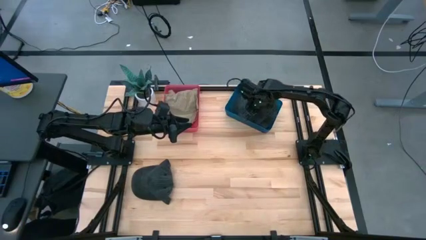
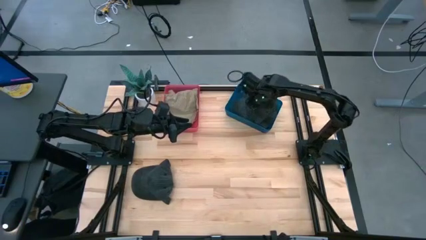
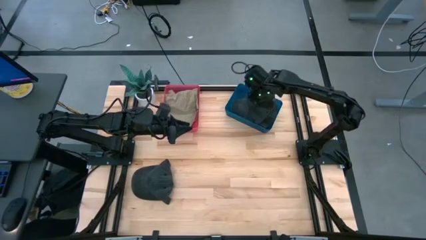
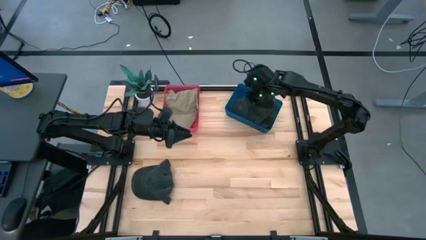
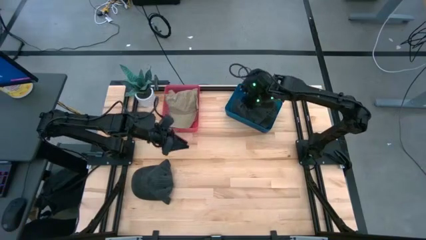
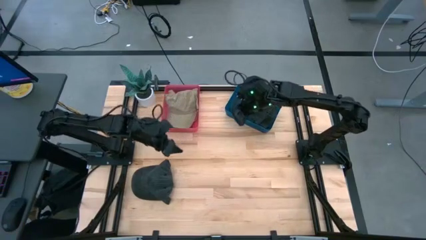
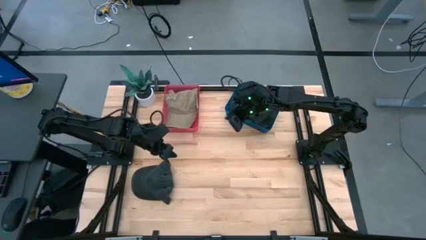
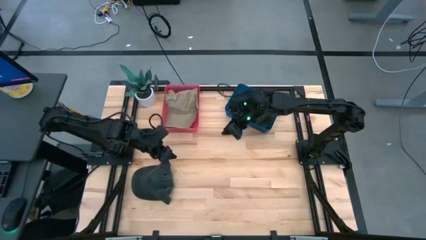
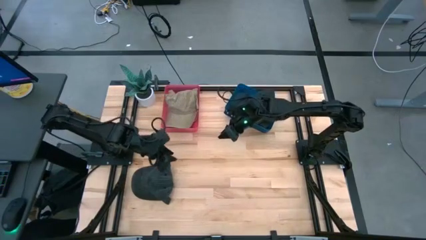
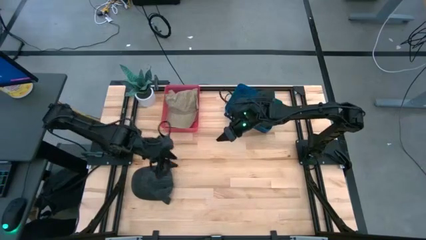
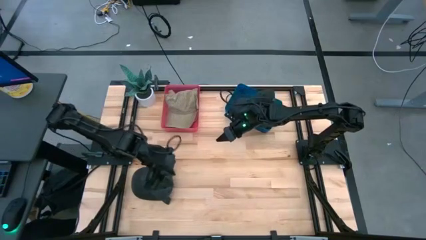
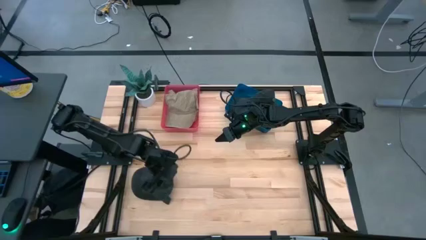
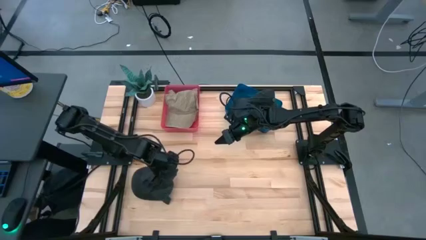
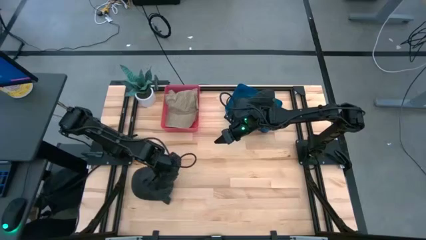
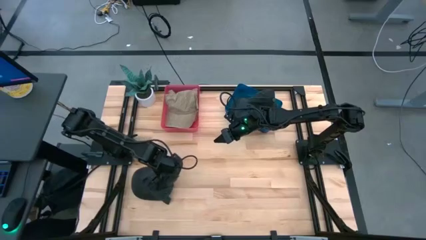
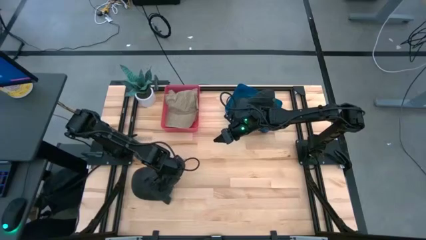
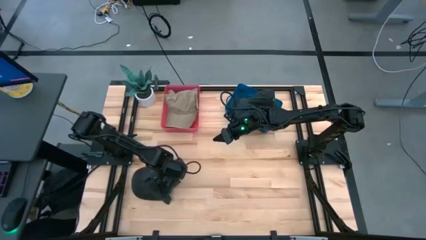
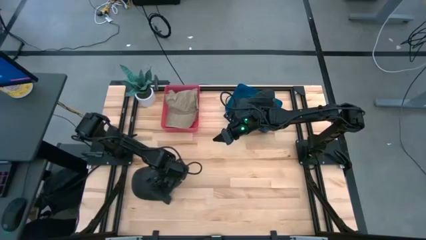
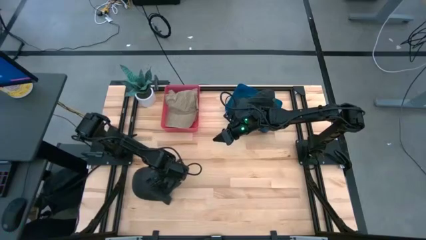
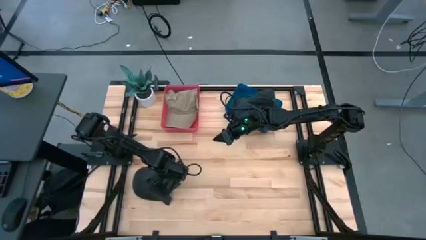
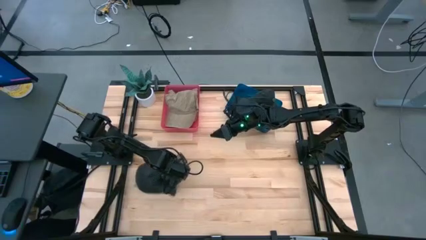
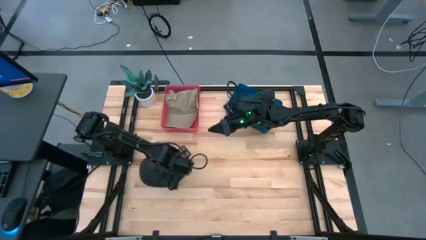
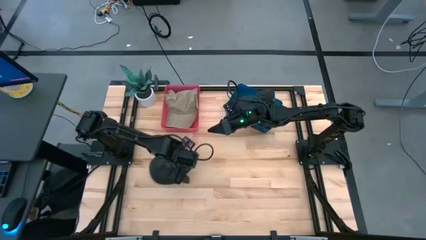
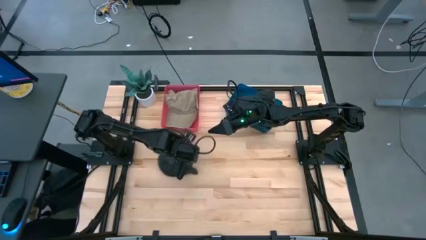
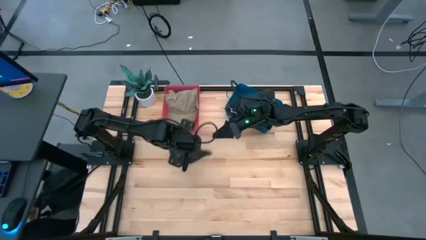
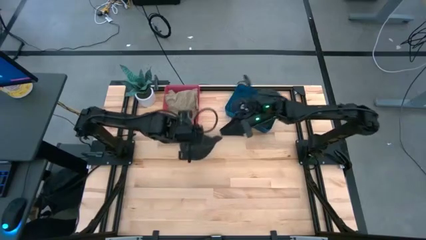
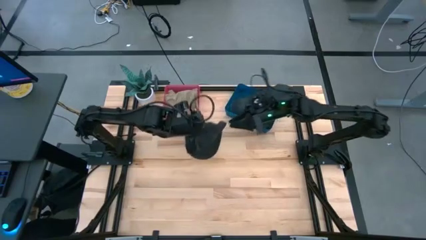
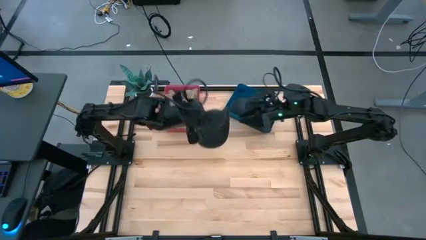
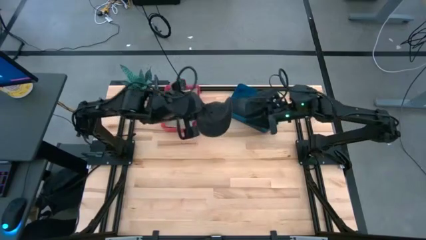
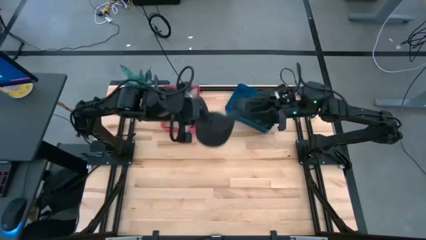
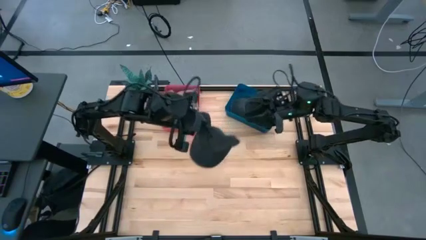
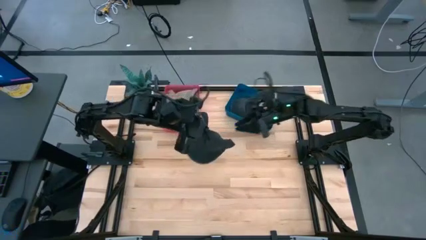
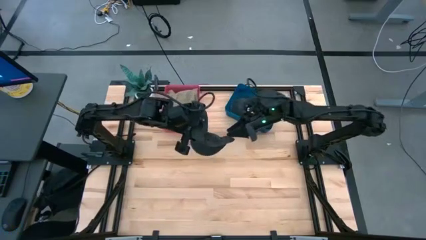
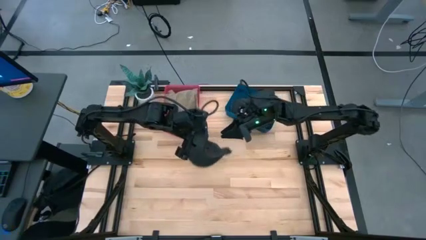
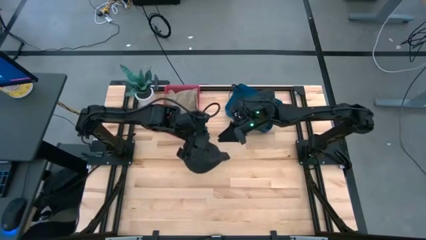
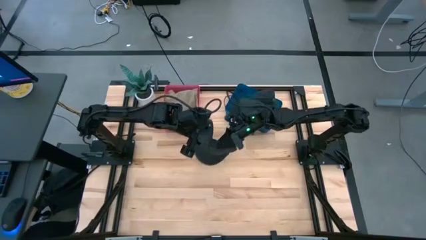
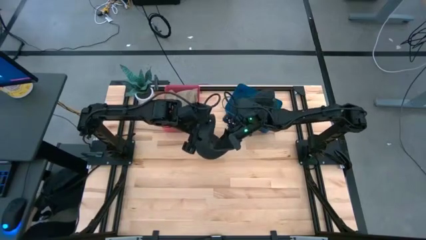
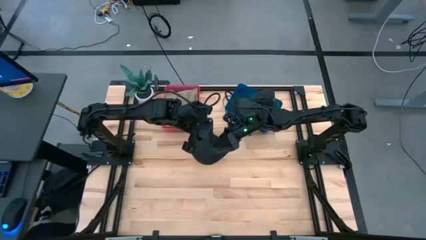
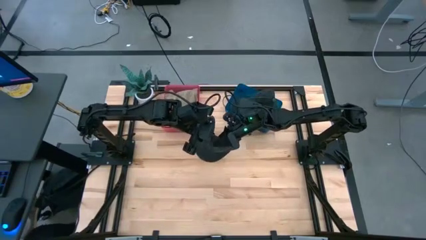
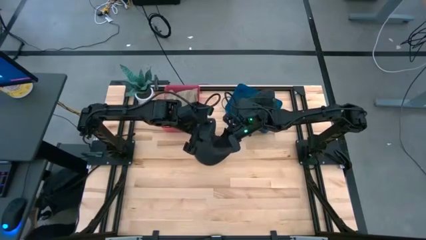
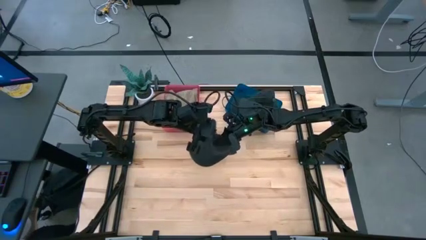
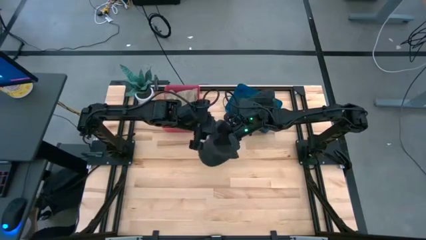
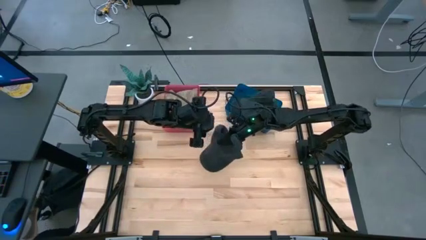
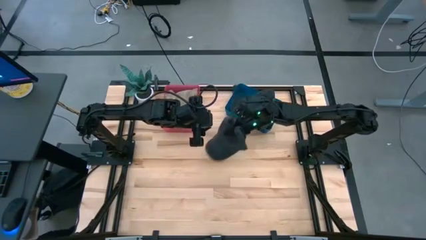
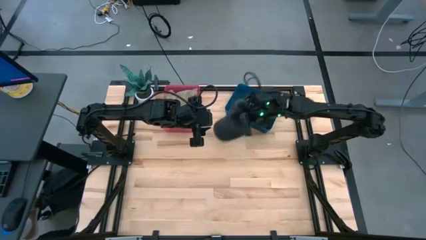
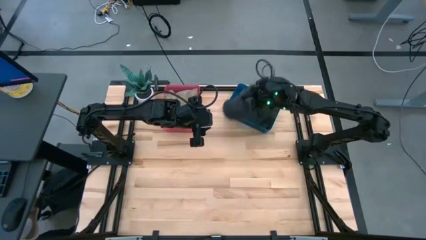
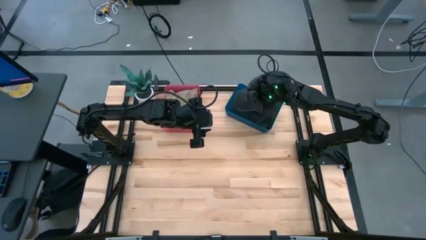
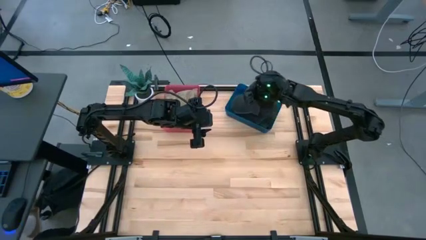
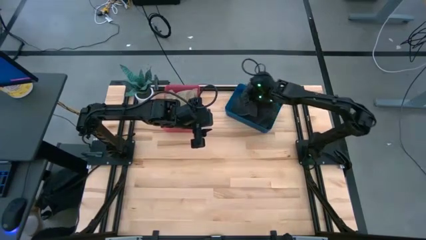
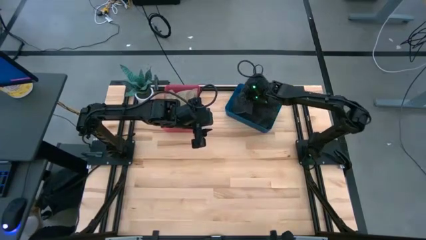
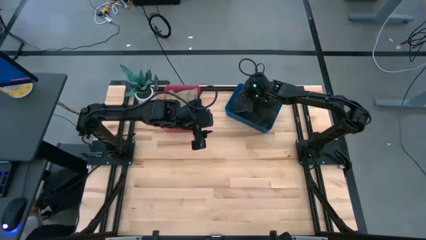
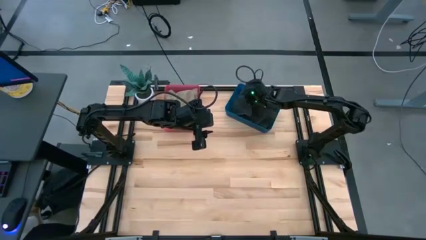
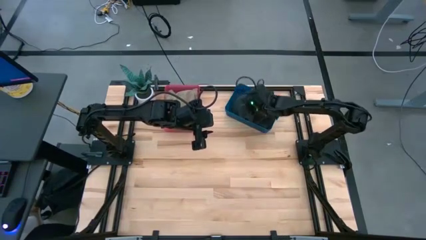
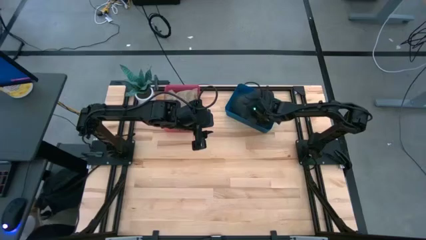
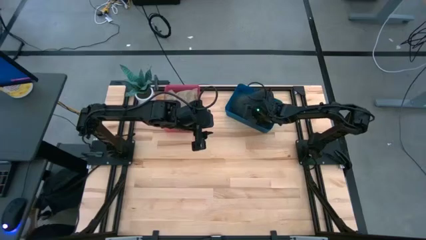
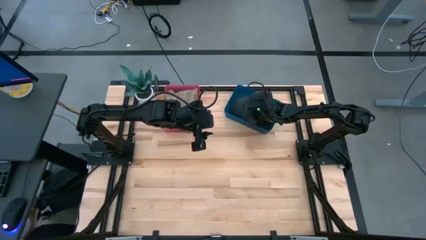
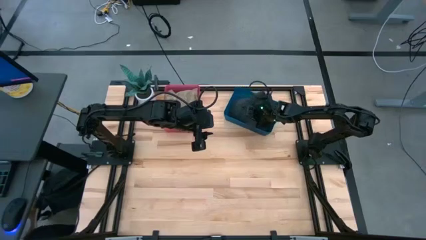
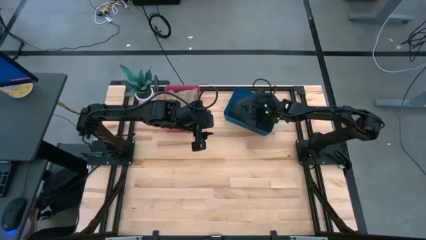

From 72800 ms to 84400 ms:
Task: Pick & Place hat
Put the black cap into the blue bin

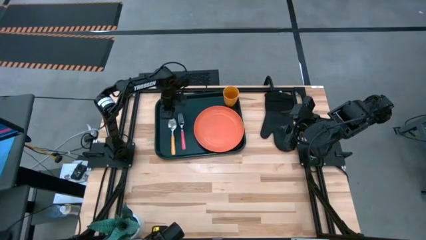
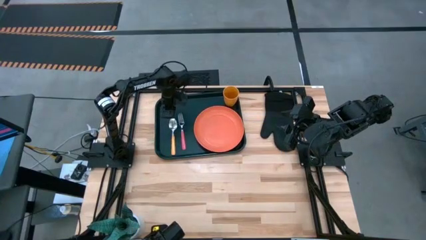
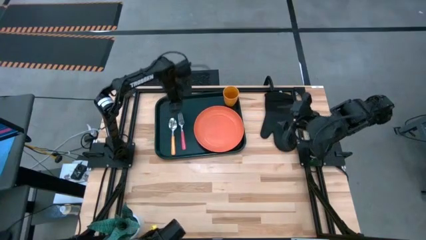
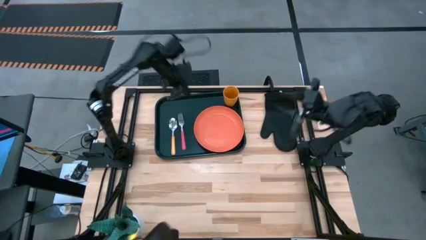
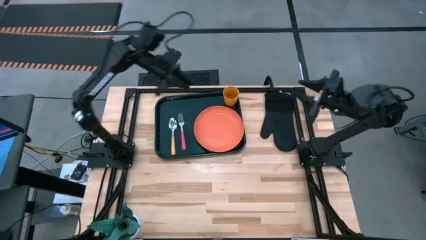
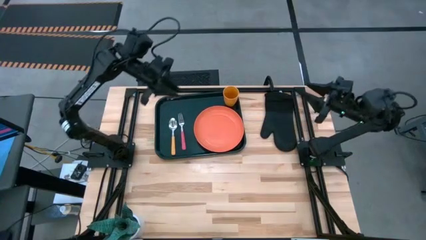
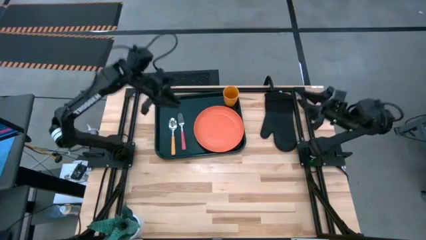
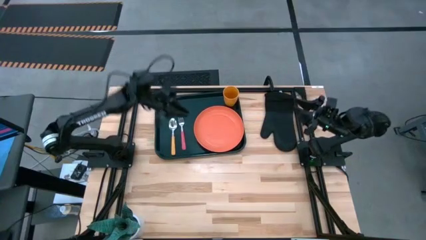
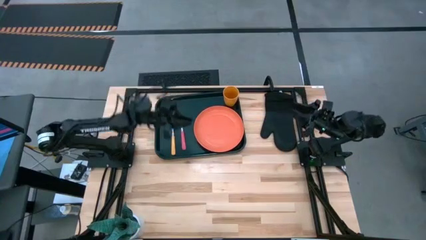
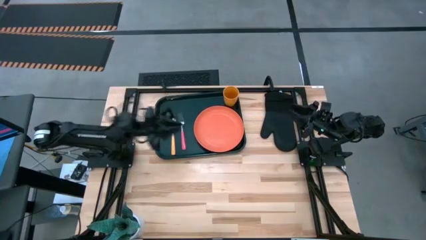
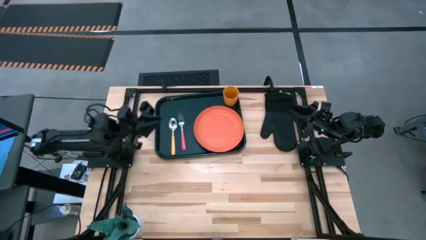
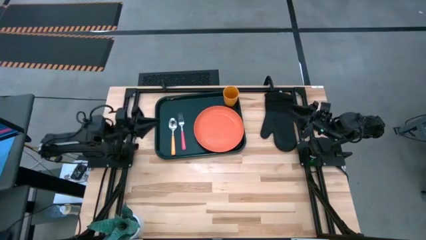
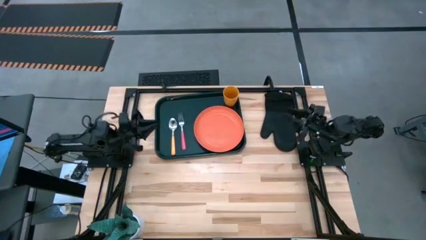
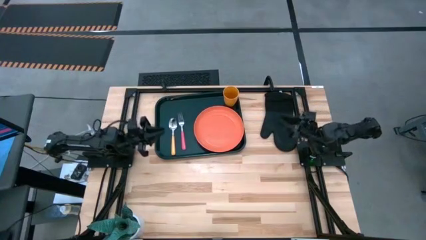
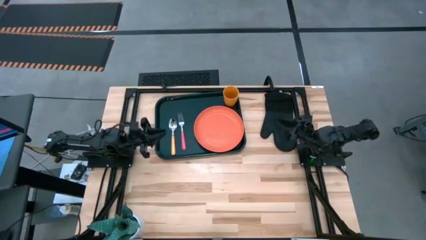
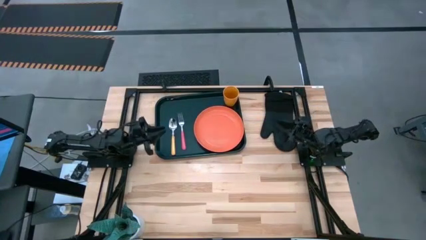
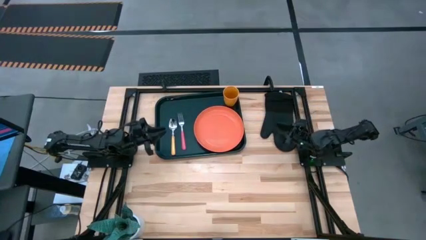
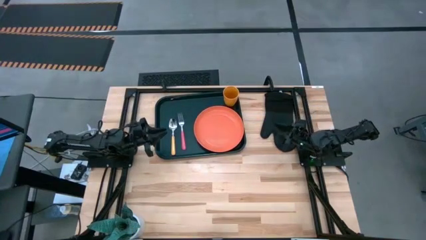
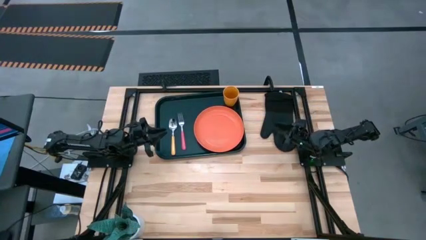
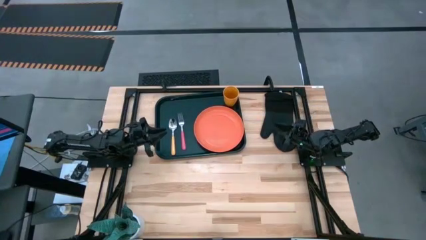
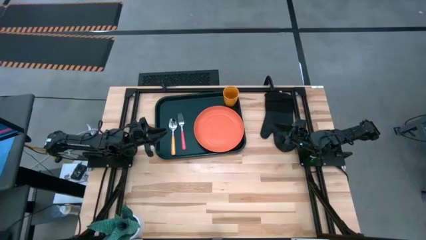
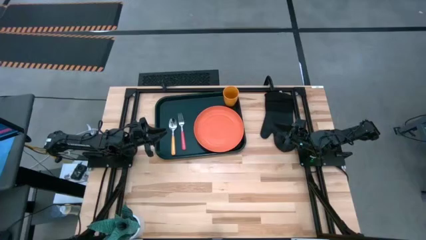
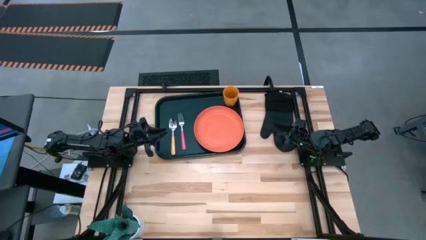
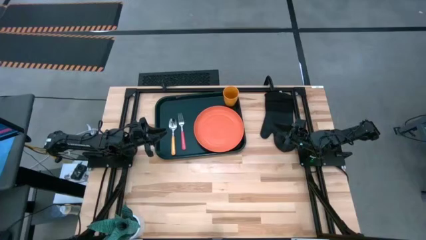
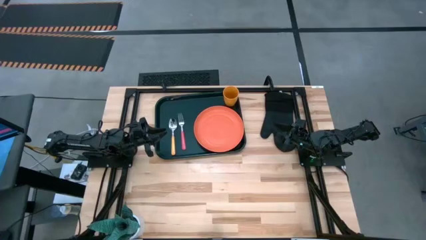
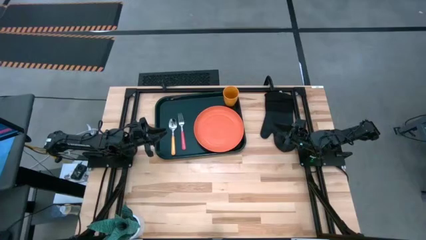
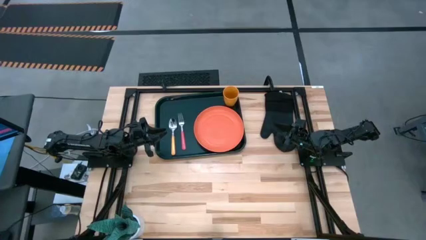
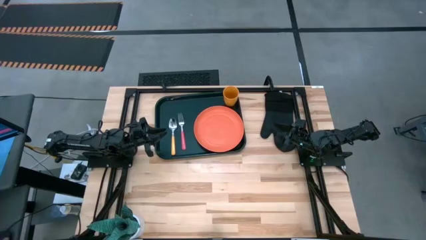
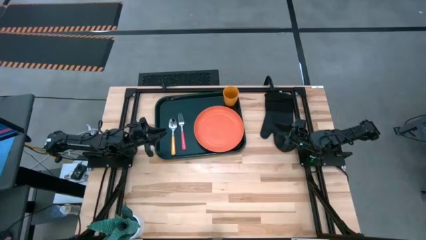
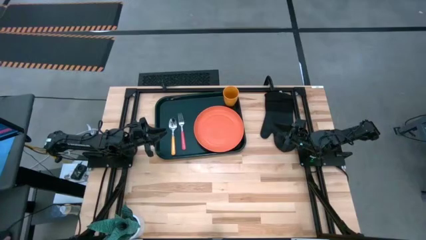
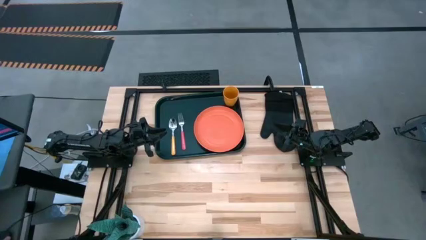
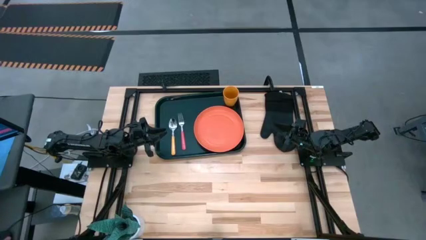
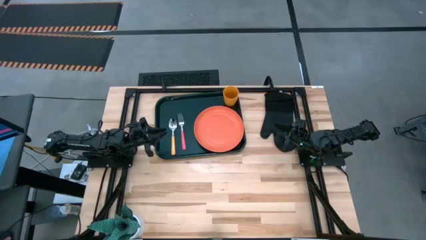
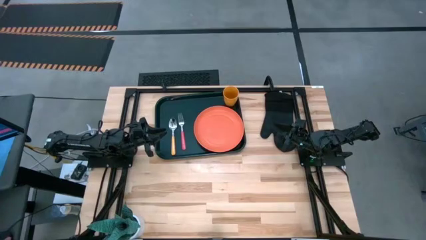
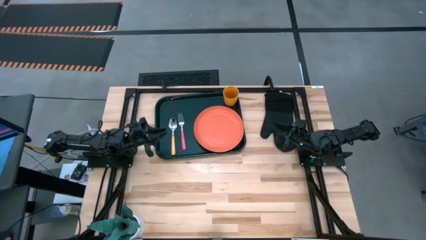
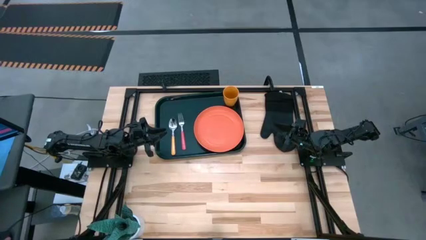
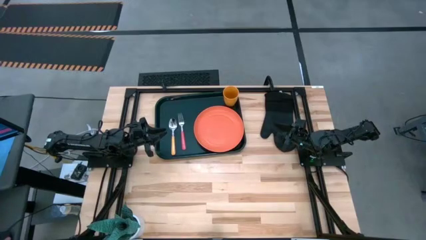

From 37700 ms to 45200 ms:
Task: Pick and place plate/cup/fork/spoon on tray
Return to Home Position
